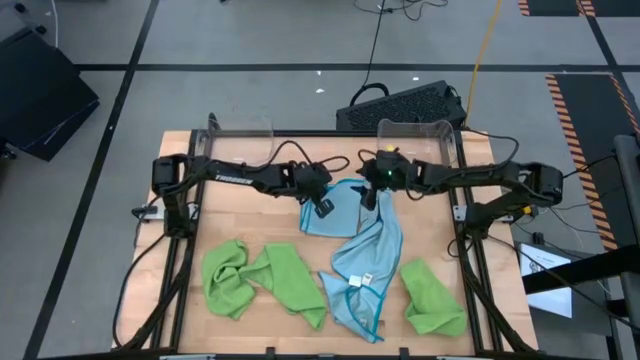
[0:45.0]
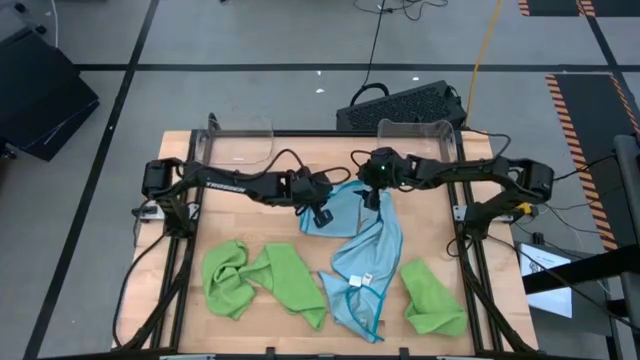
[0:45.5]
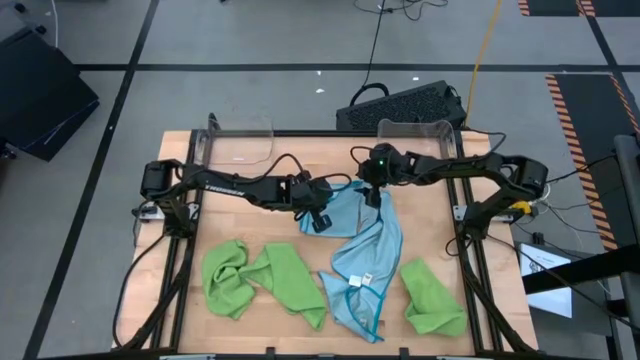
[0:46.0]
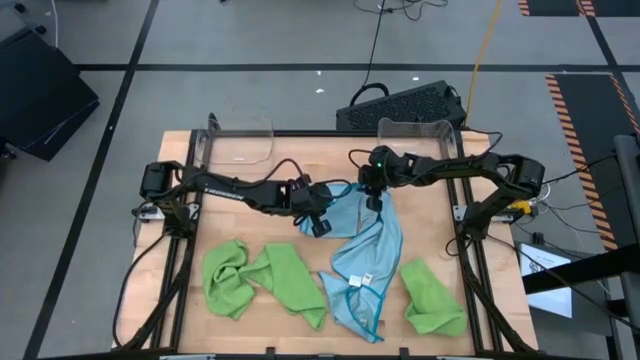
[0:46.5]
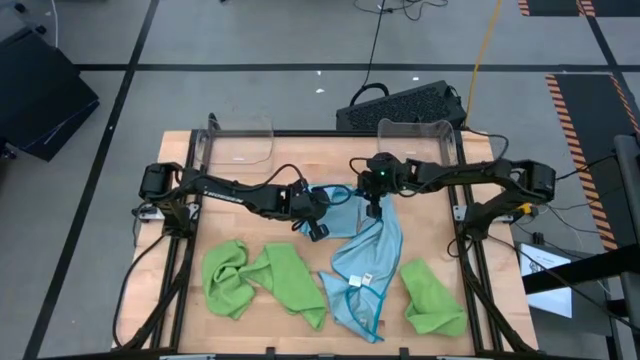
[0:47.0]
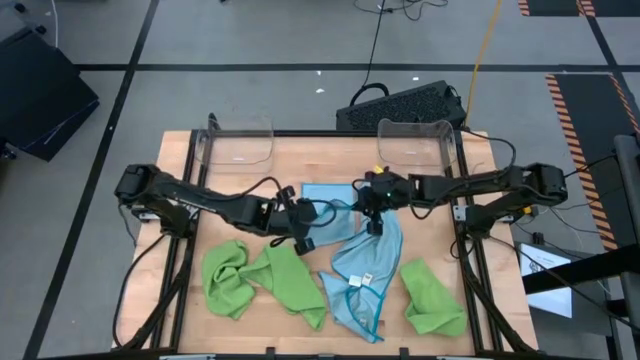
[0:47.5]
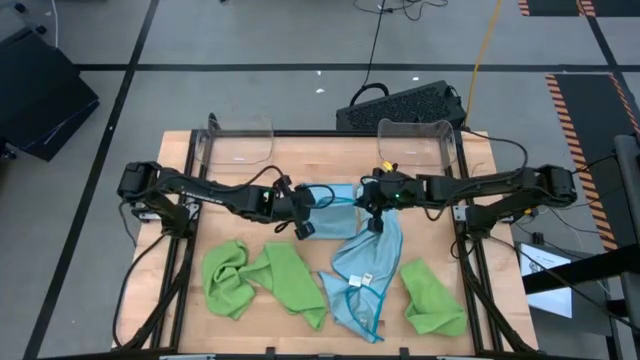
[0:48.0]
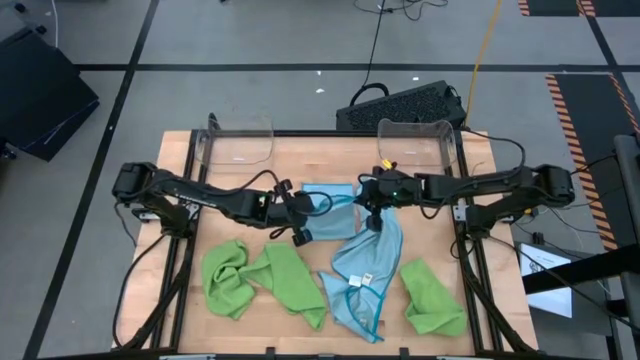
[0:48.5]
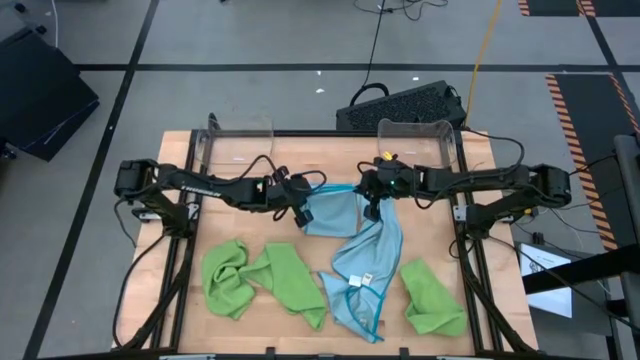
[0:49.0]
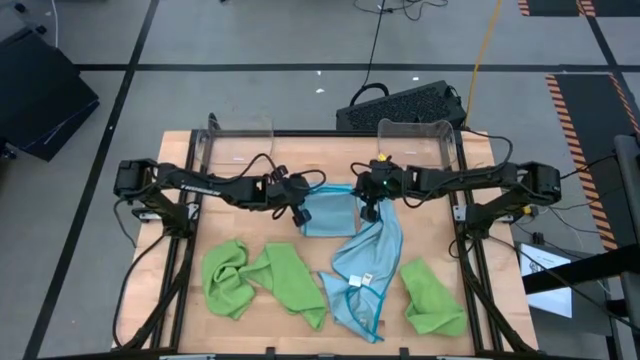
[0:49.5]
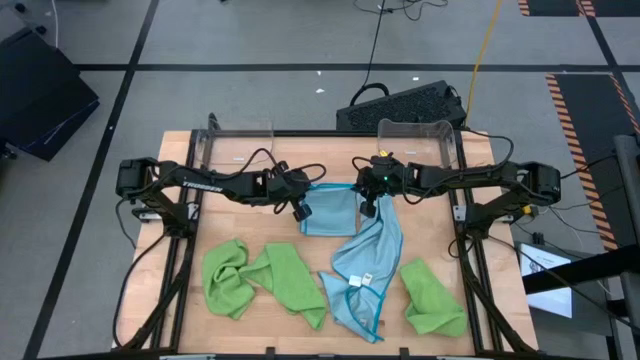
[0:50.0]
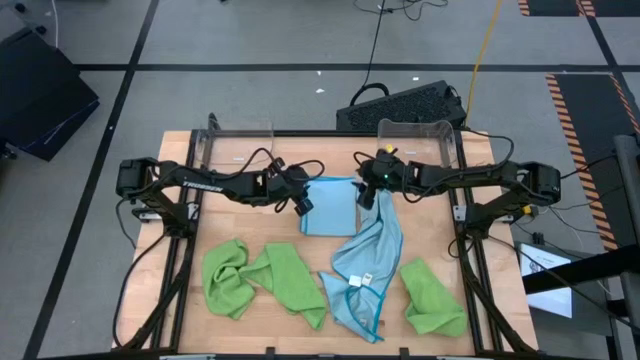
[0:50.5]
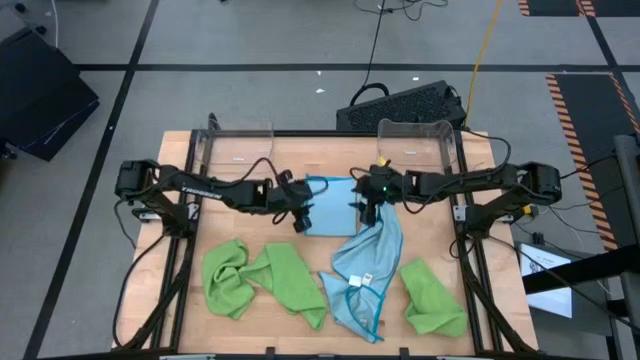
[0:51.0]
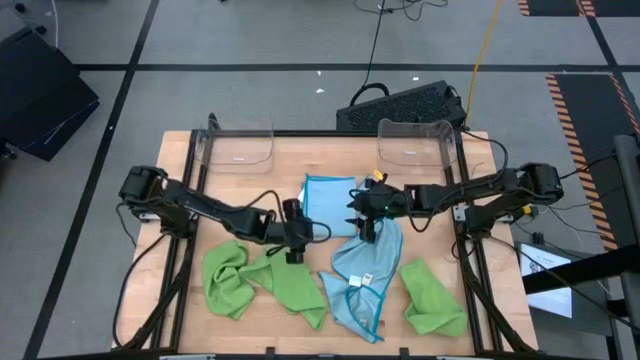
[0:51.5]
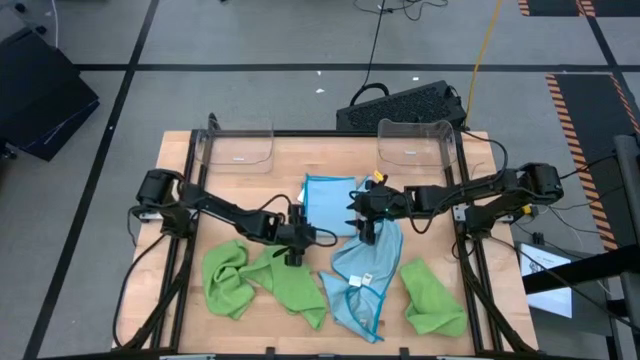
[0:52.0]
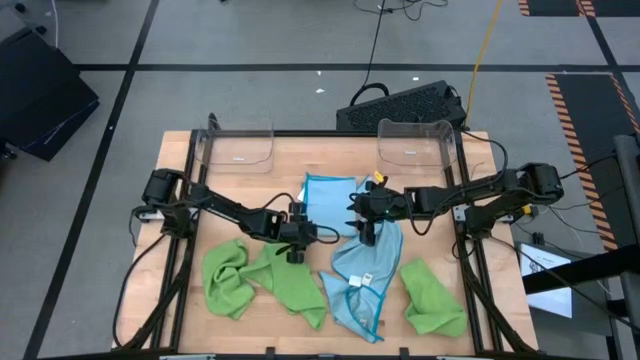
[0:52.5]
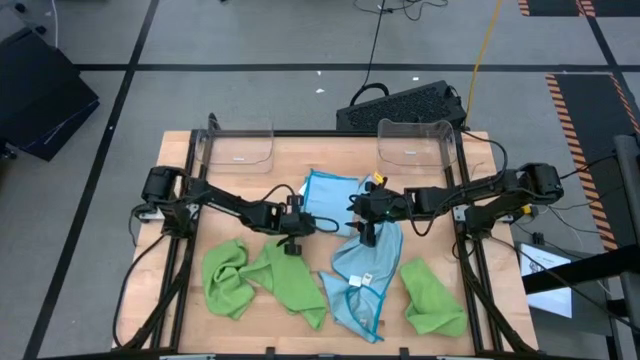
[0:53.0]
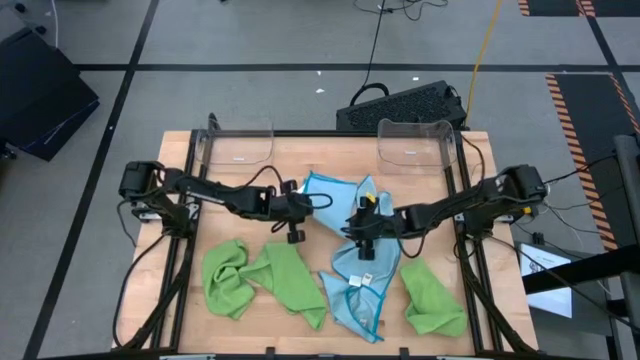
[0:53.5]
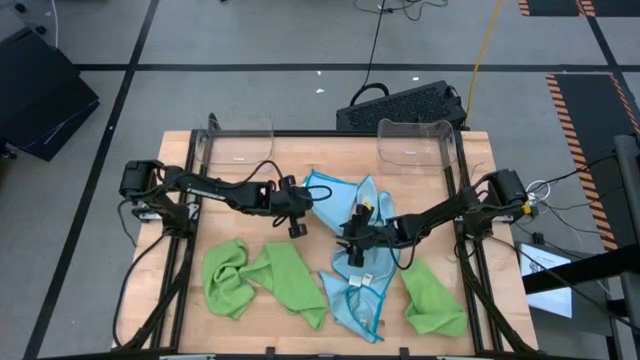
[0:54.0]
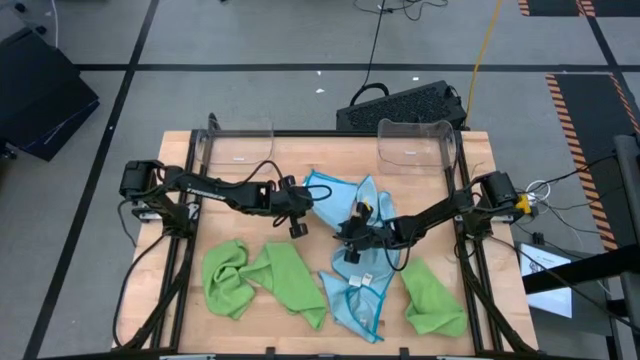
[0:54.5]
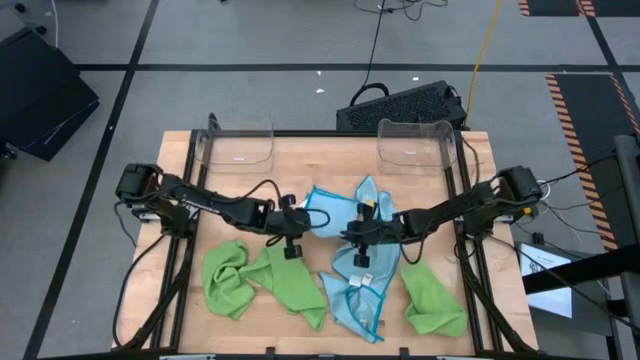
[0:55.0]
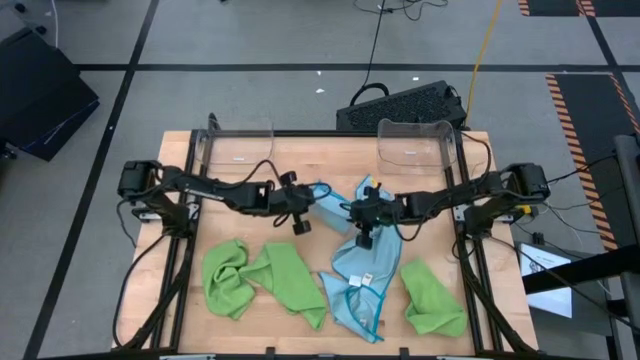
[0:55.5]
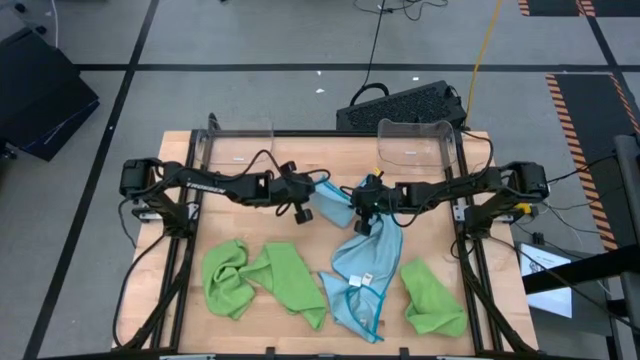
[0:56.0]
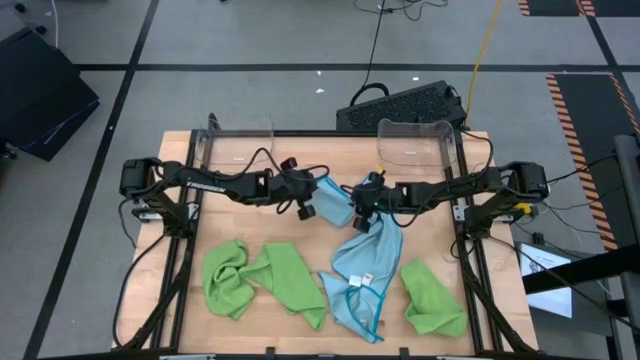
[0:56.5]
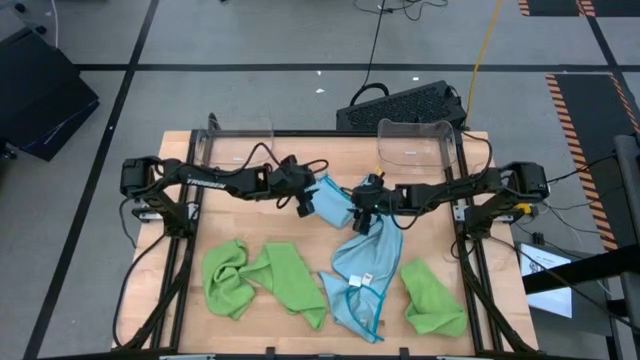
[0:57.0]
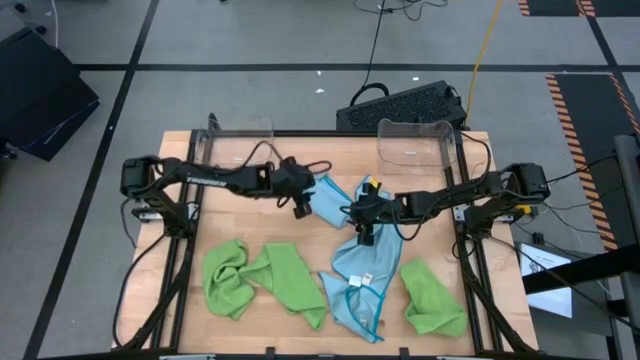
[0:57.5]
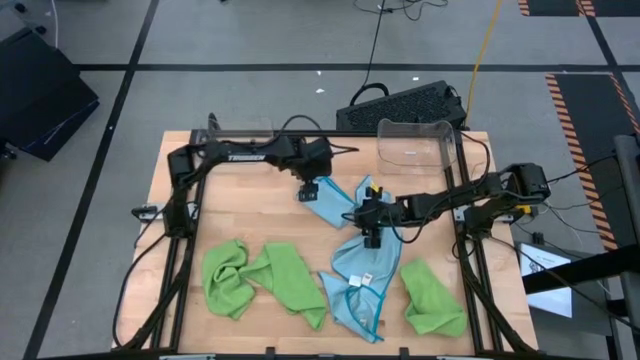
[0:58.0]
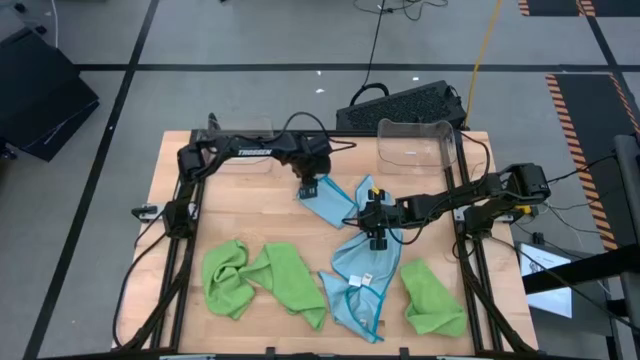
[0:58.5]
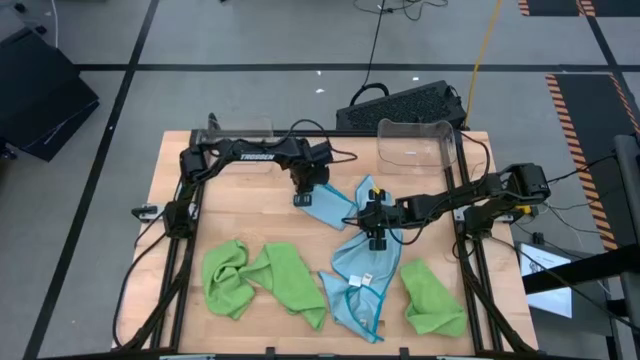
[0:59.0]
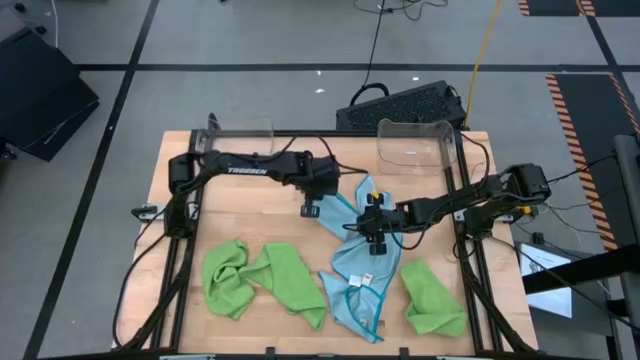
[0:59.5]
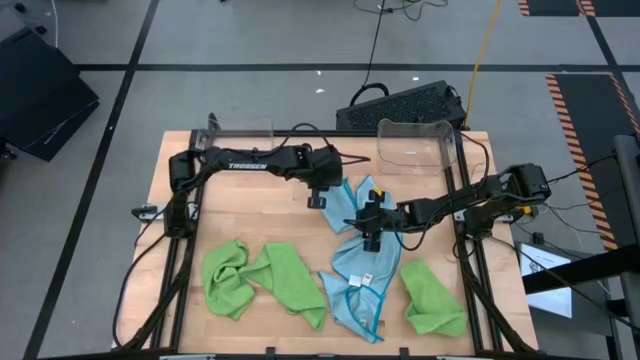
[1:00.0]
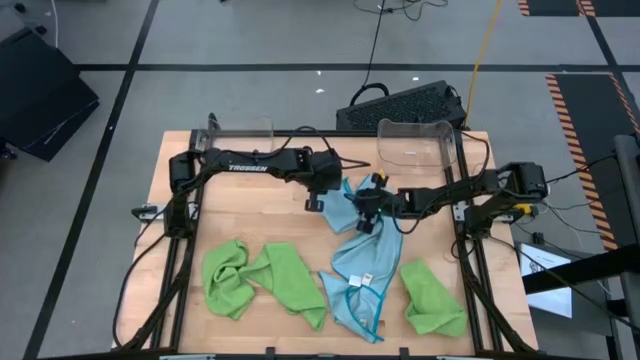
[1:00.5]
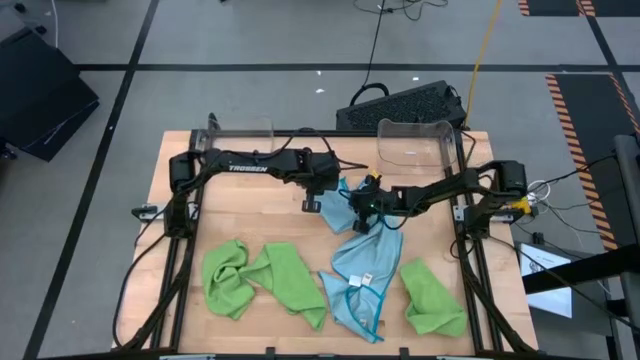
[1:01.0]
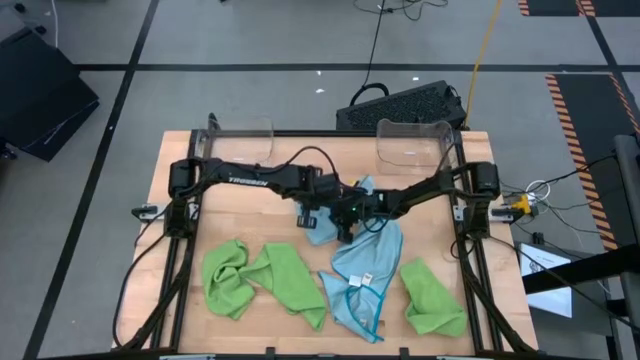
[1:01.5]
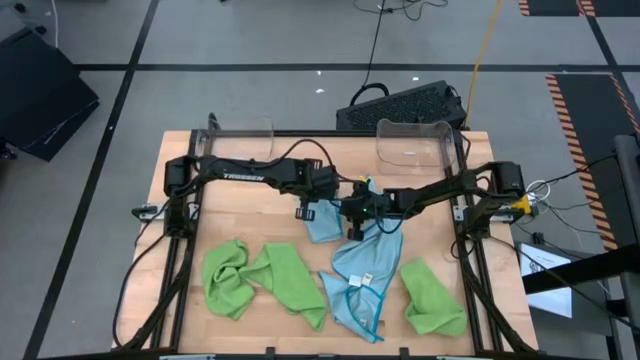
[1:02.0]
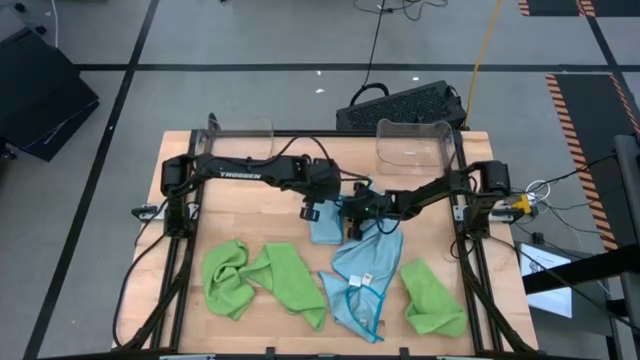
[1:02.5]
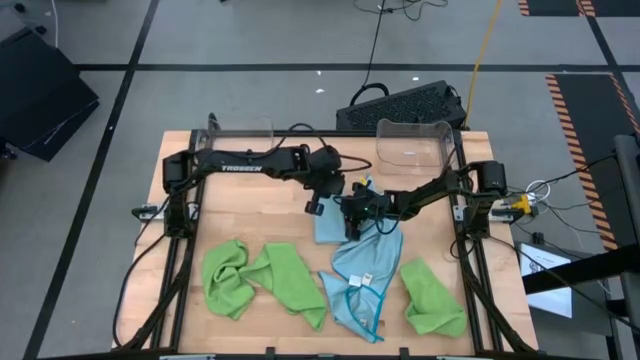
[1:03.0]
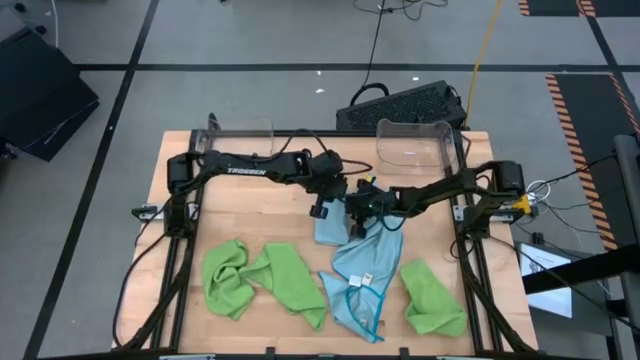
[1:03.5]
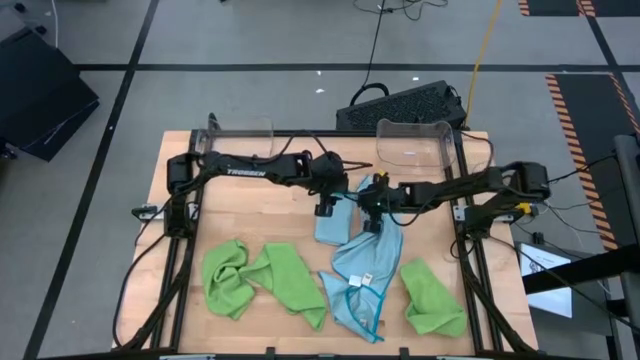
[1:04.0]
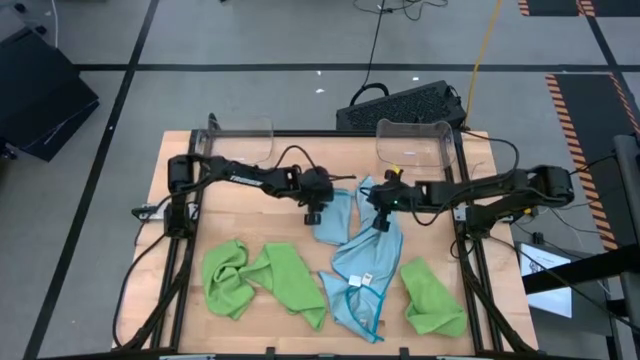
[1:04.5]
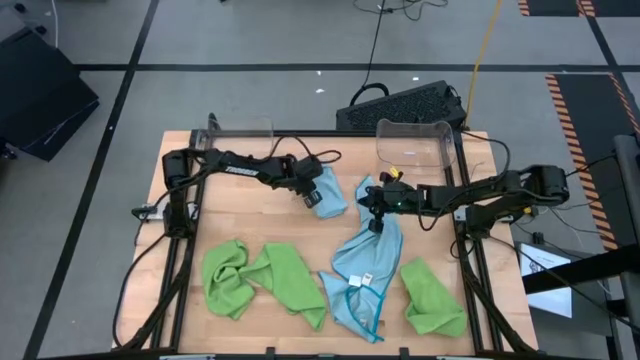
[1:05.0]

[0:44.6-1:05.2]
Task: Fold microfiber towels
Fold the top left blue microfiber cloth

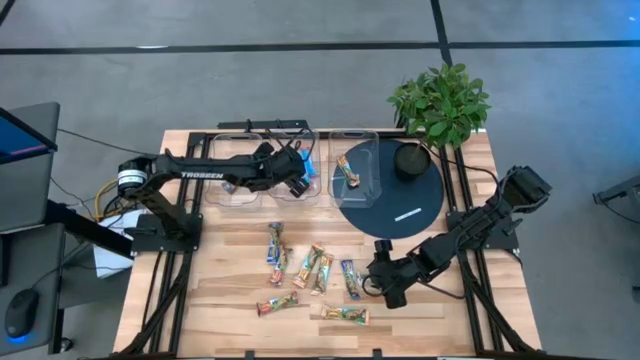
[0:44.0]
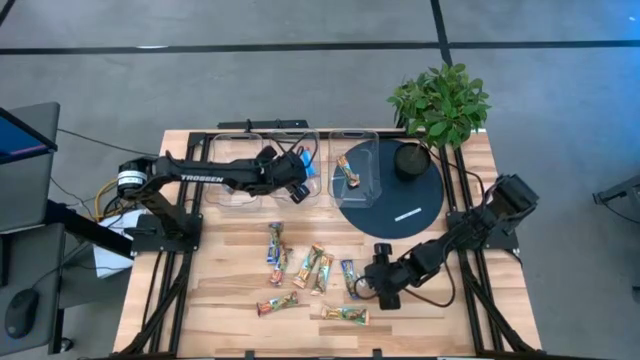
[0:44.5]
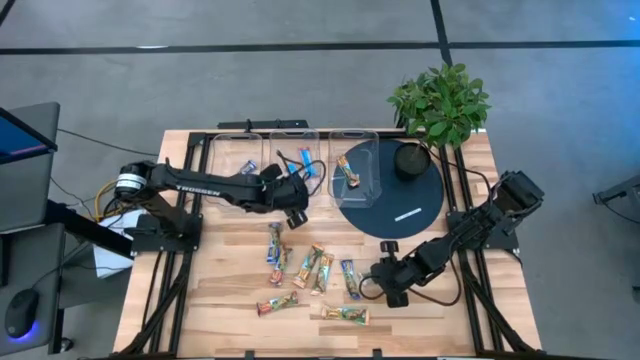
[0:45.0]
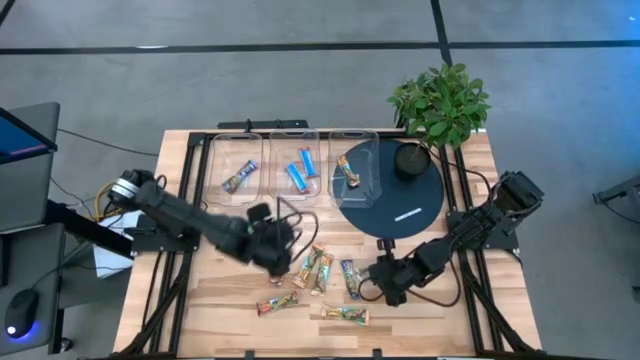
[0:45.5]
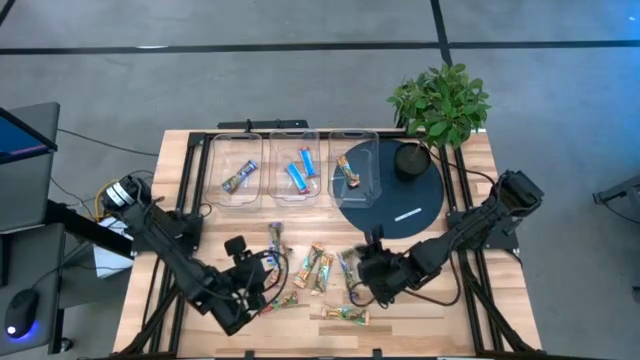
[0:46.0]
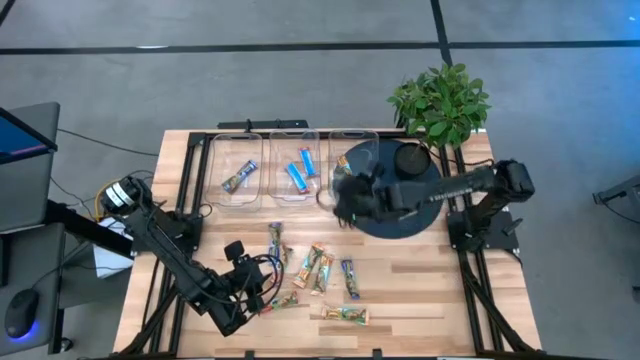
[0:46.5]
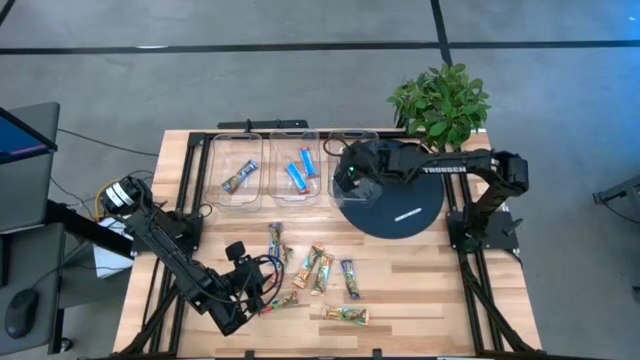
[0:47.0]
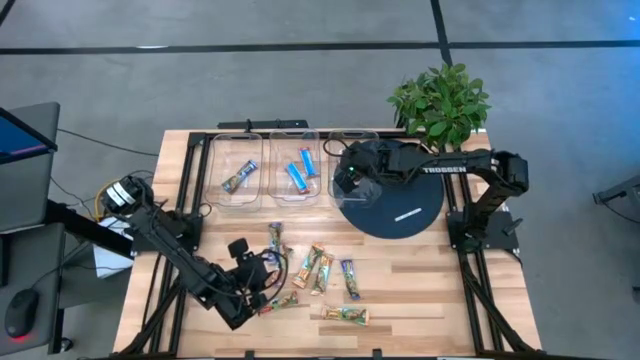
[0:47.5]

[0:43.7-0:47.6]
Task: Pick and place Granola Bars by type
Put the orange chocolate chip into the right transparent bin
